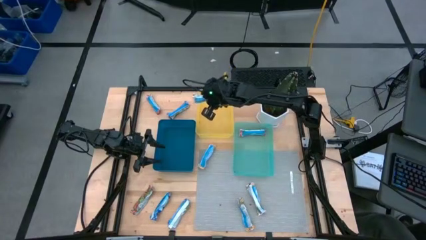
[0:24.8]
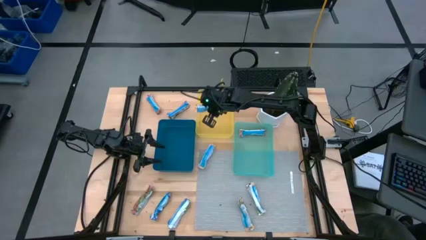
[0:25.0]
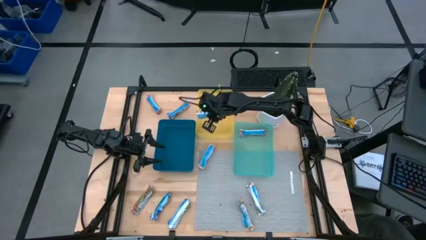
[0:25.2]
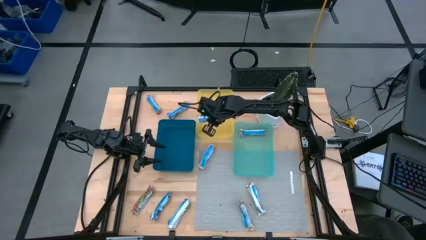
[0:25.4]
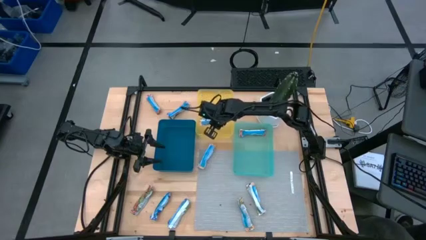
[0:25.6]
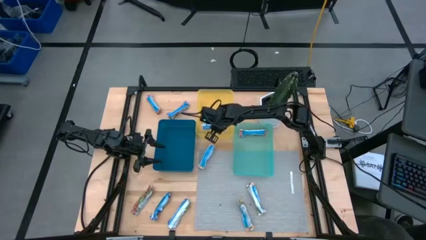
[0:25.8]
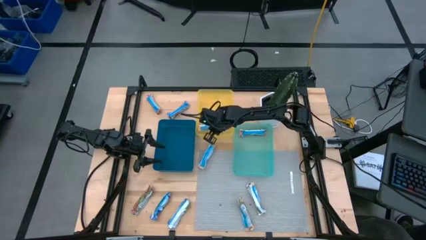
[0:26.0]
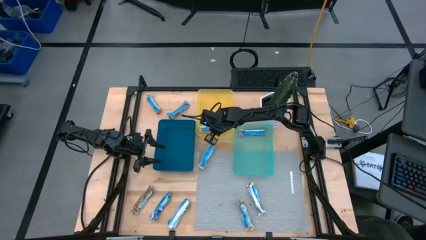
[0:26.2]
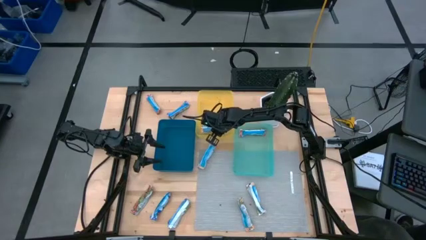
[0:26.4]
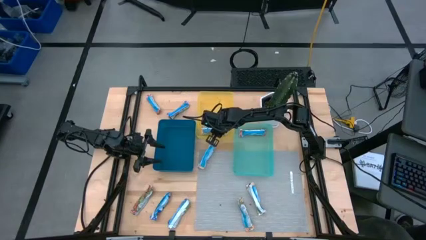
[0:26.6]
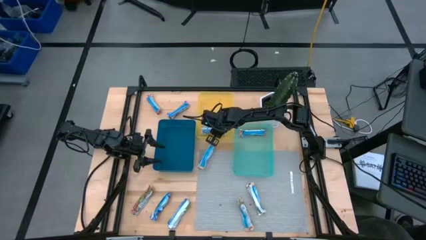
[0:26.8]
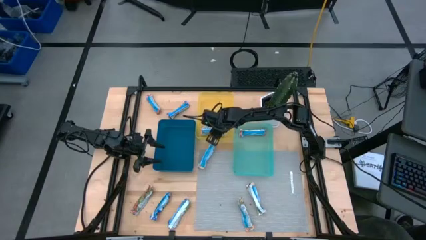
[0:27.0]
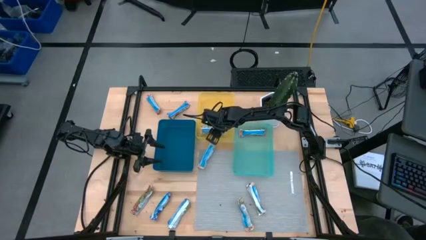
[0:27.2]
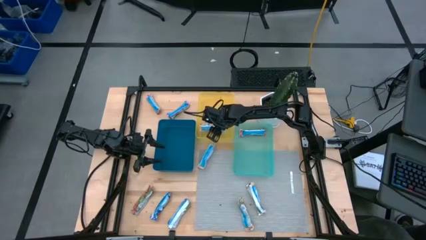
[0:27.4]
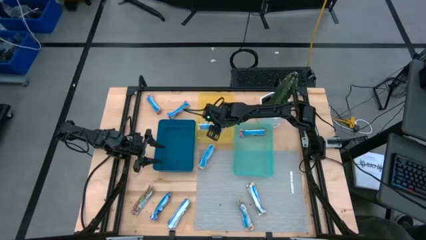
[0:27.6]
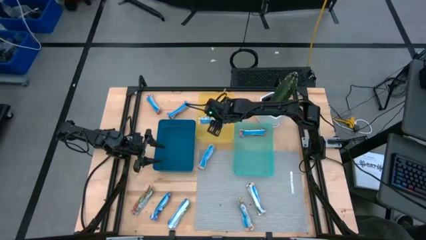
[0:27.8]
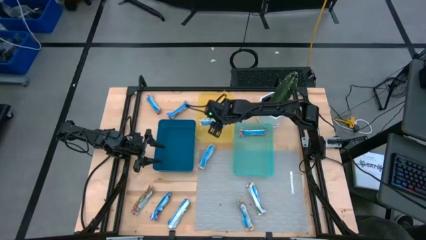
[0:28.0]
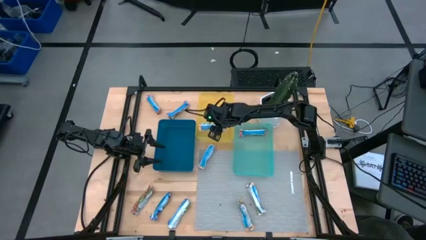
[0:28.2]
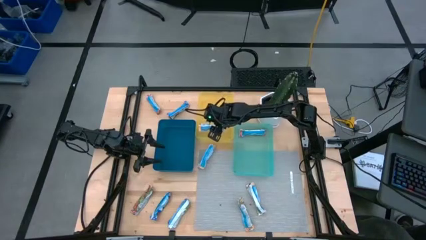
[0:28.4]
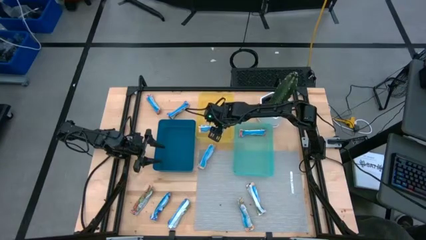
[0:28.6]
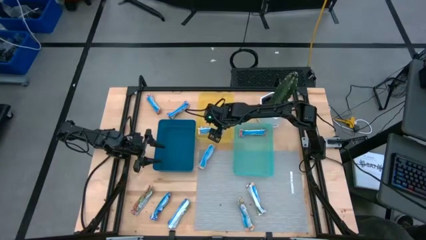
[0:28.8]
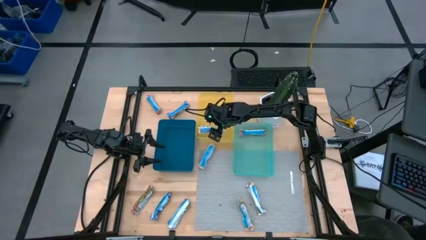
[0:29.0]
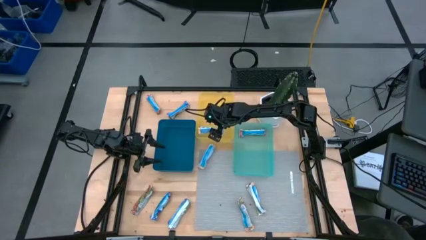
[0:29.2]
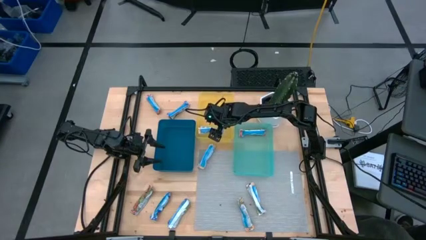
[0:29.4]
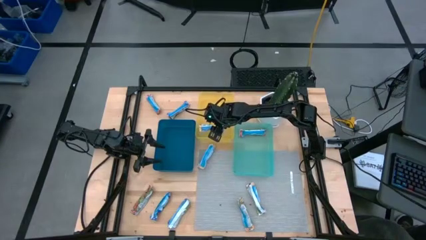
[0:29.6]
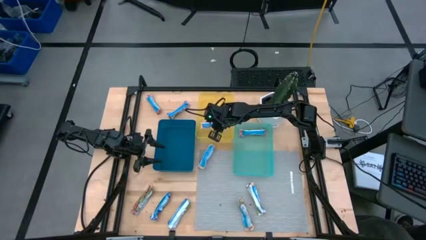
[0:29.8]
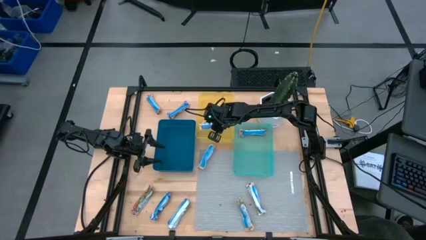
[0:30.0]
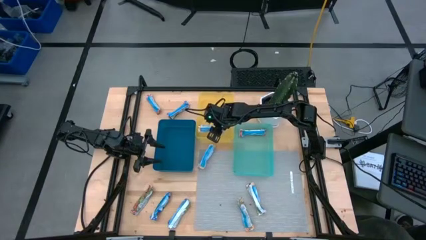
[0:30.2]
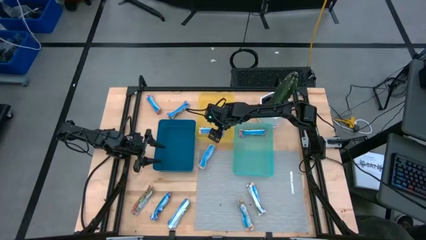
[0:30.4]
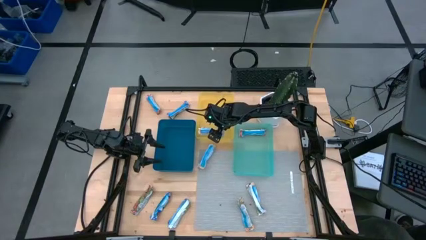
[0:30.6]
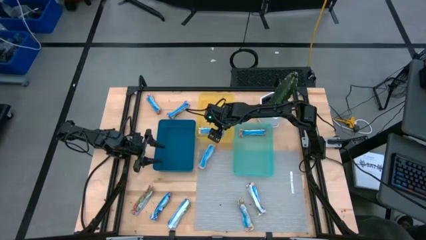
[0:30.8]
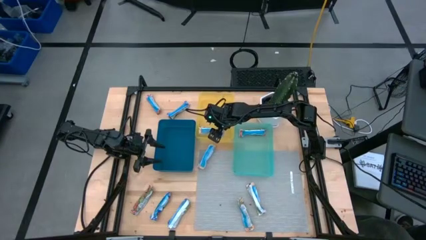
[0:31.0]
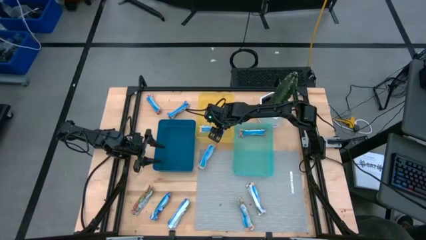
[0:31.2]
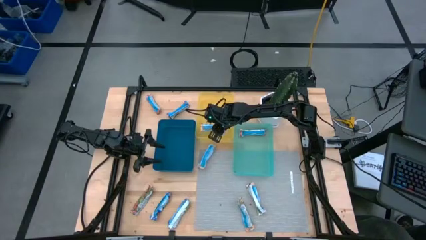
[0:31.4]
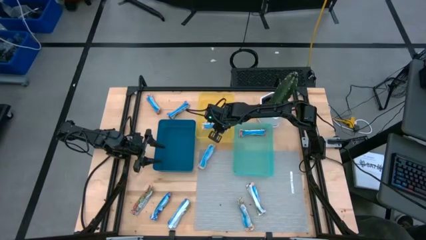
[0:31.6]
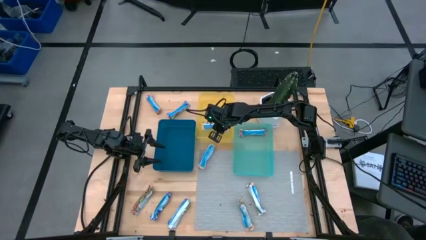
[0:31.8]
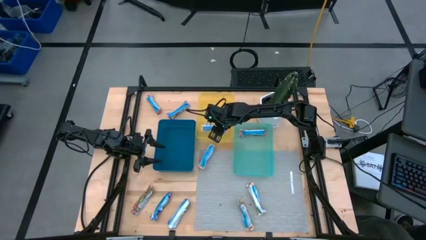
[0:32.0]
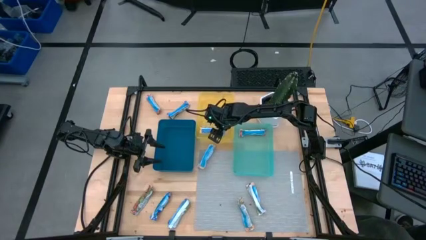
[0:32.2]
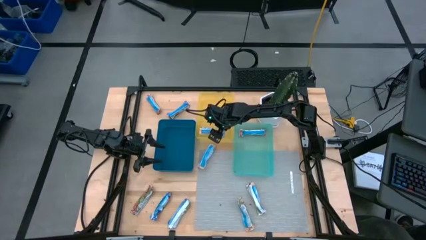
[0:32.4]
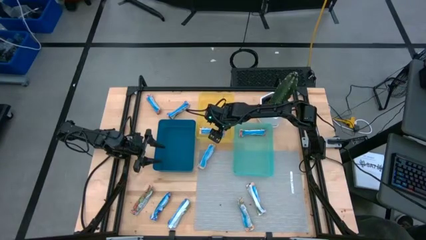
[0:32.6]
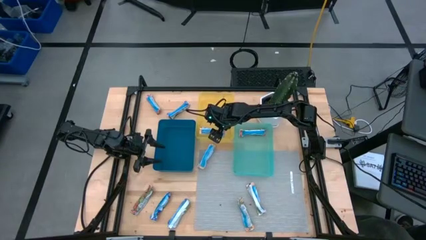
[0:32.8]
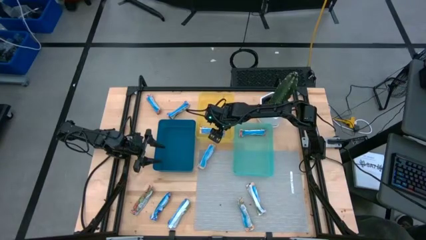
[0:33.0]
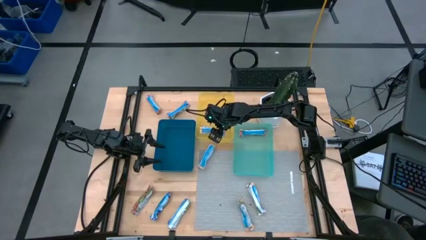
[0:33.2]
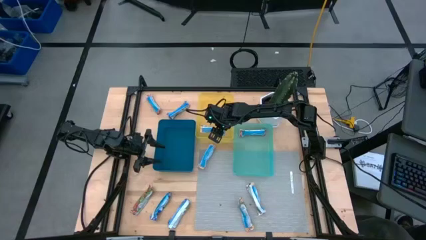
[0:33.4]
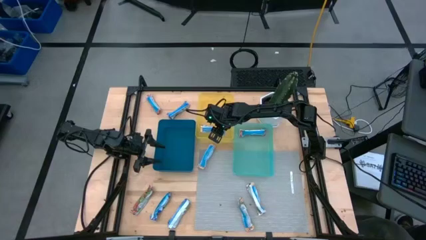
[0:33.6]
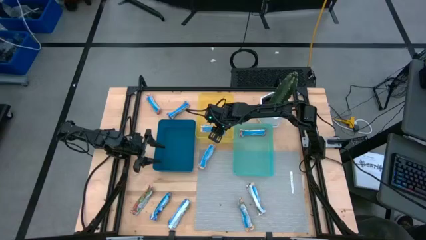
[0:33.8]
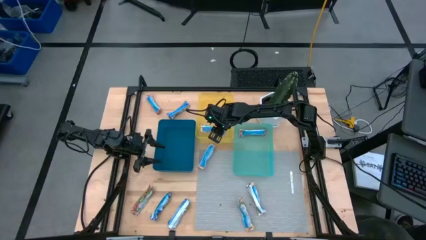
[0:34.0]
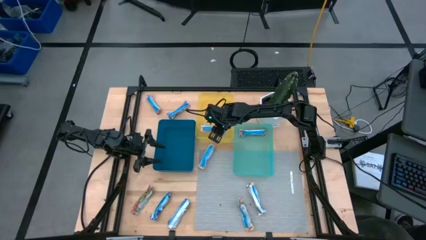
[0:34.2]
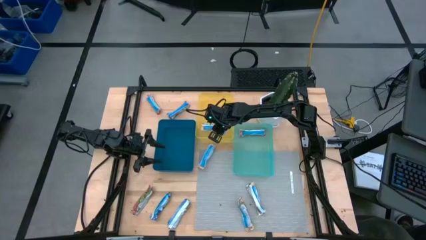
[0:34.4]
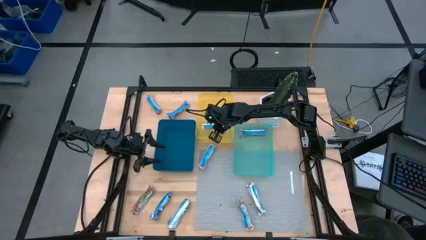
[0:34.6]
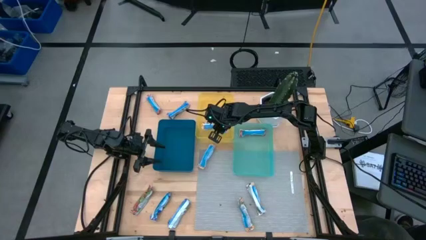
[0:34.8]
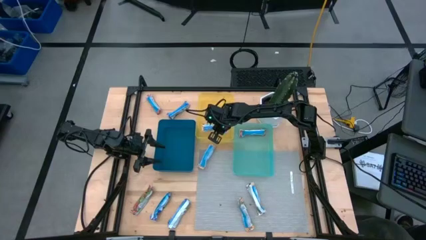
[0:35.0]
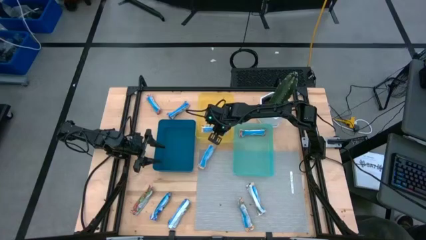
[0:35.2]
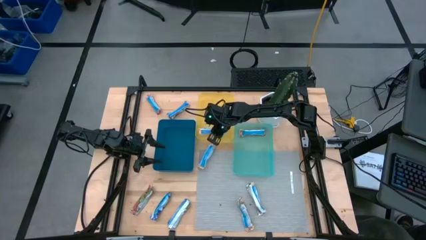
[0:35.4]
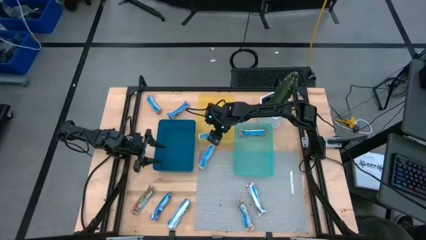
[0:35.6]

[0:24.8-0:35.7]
Task: Pick and place Granola Bars by type
Put the yellow granola bar into the yellow bin

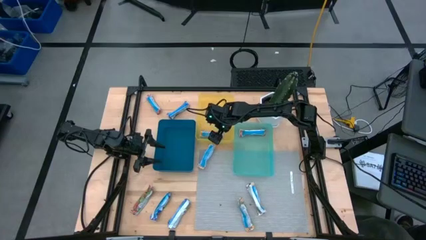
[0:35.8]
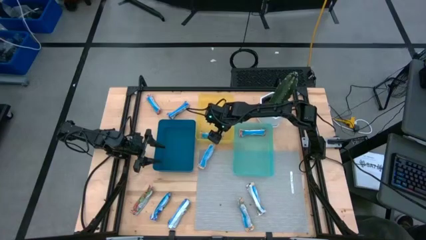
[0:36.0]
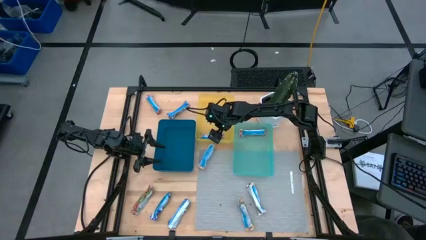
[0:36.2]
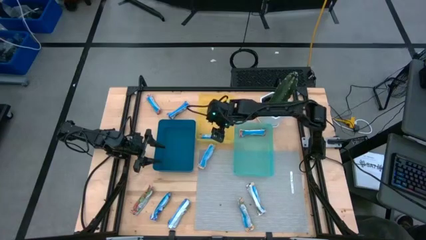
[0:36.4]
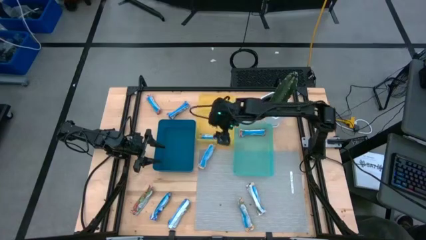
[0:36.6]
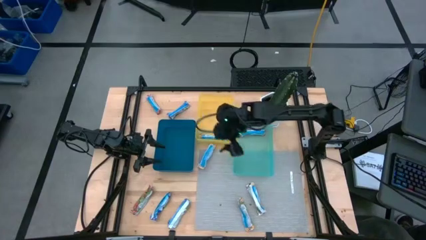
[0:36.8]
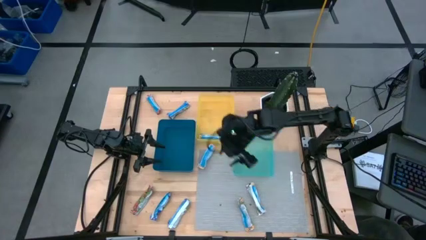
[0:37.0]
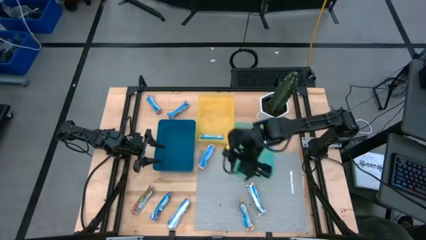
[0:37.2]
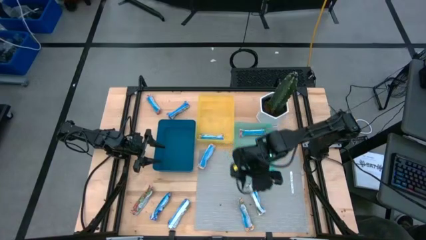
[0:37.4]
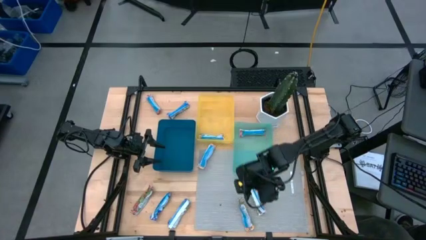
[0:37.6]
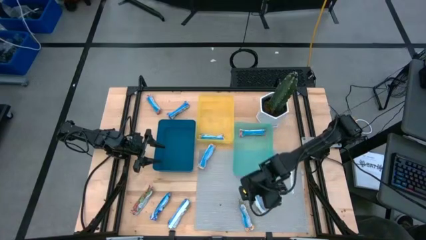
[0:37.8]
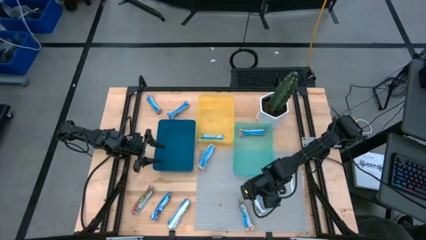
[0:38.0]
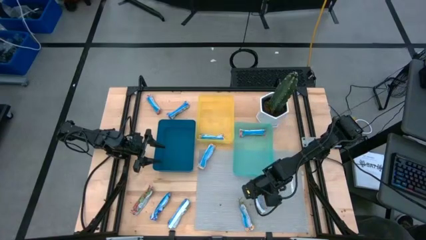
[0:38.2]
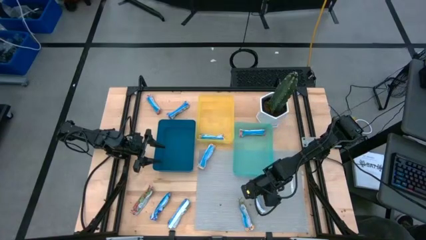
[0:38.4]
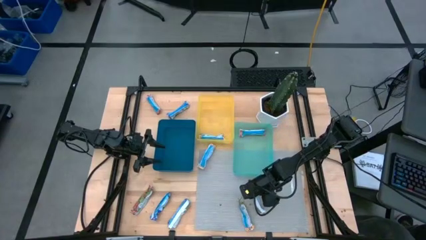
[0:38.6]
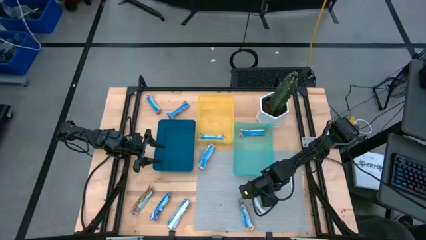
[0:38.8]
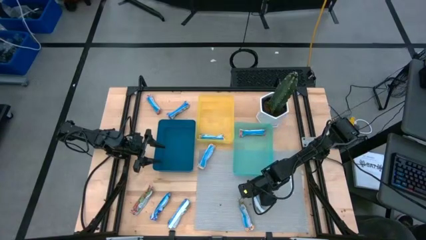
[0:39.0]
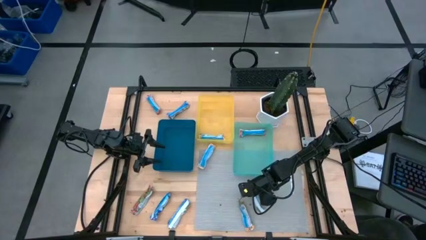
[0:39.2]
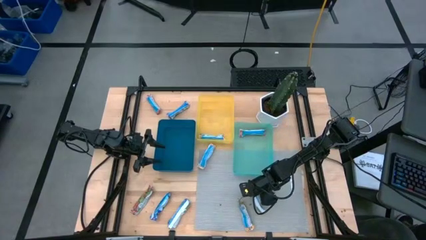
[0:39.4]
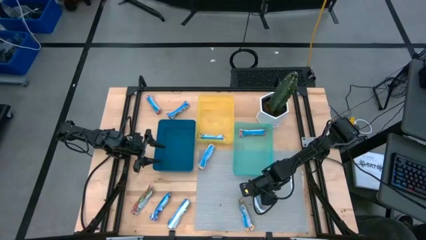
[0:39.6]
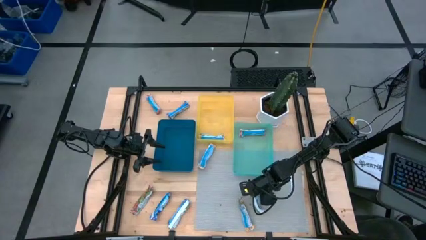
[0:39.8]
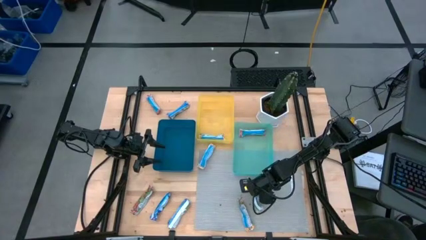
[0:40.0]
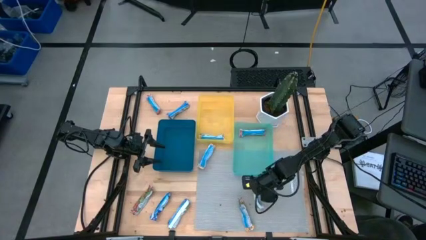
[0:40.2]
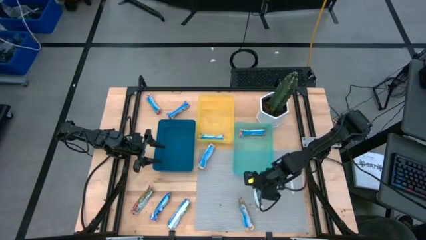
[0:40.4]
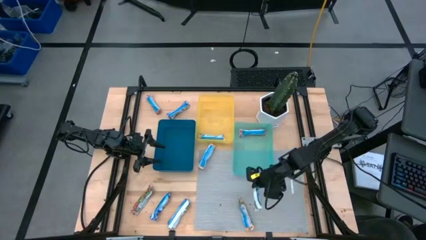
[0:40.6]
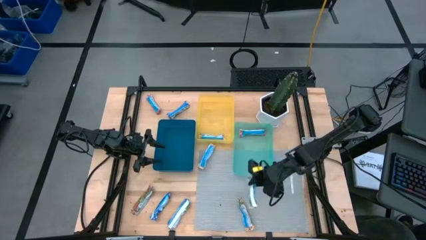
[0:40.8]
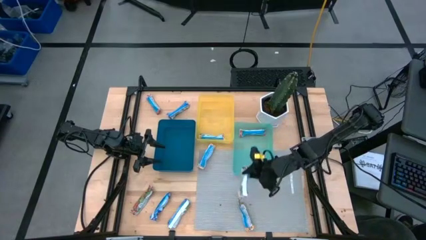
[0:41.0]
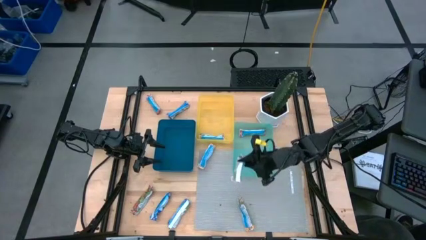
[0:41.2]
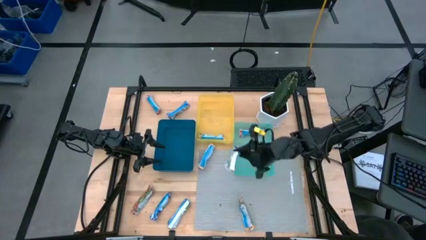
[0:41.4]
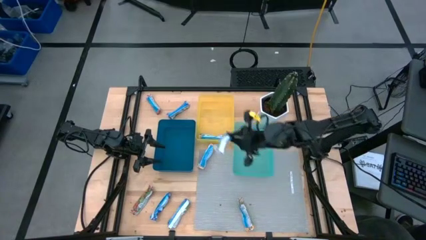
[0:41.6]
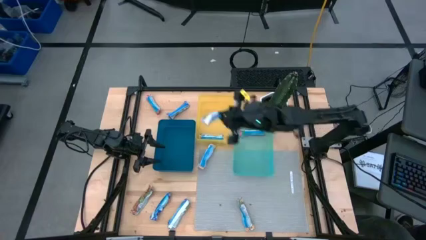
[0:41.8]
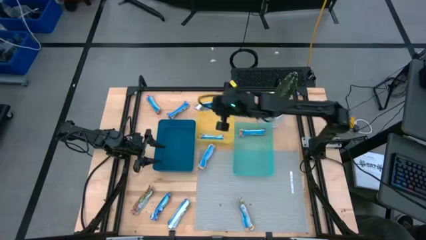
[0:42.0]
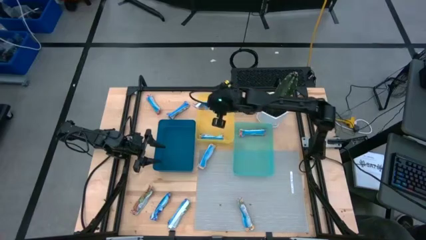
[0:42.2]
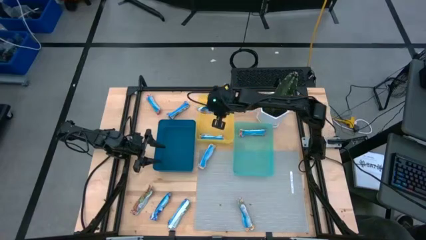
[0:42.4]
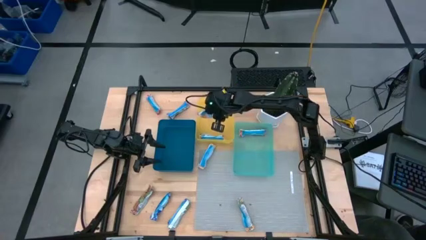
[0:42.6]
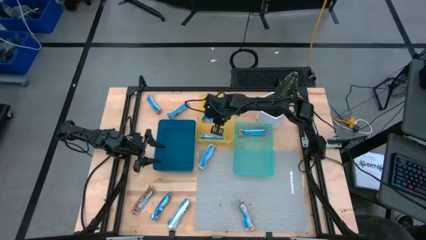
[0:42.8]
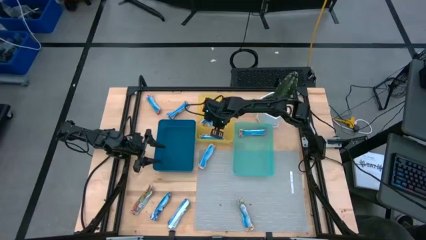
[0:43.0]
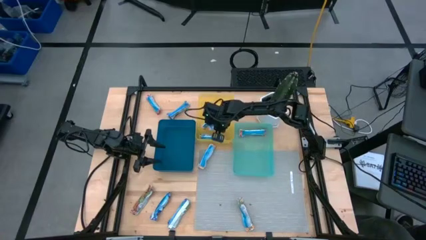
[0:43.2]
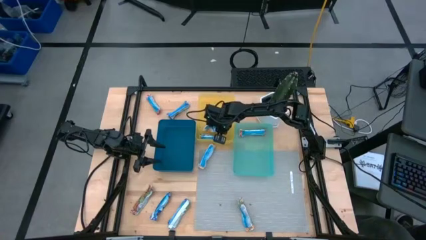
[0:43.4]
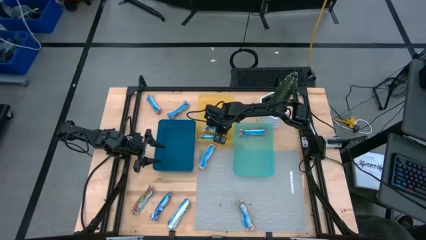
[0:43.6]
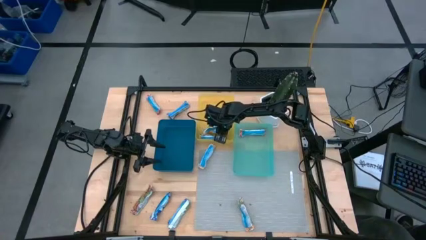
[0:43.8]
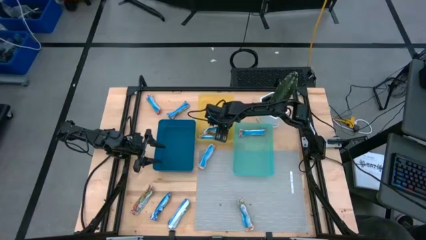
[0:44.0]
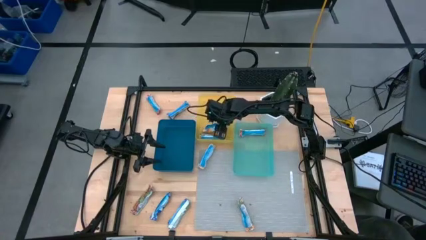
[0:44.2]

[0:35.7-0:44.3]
Put the yellow granola bar into the yellow bin
